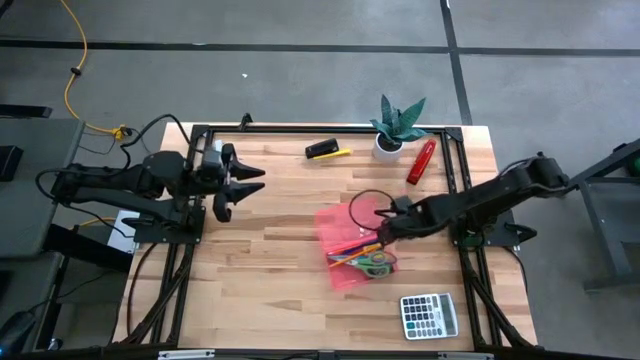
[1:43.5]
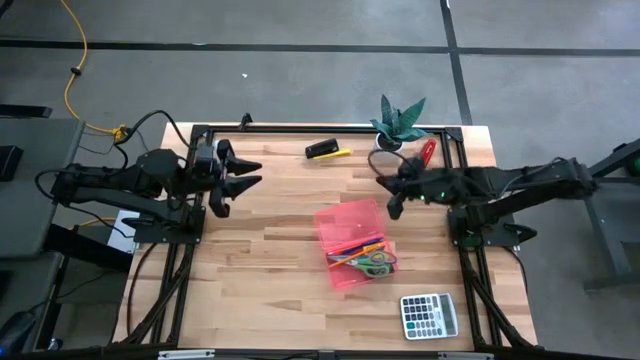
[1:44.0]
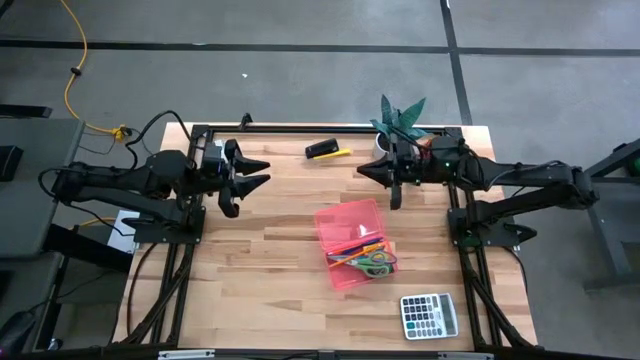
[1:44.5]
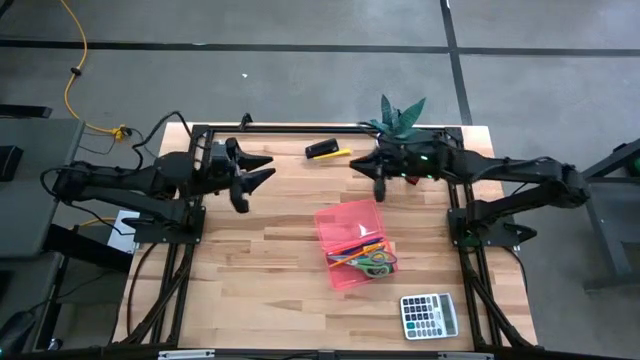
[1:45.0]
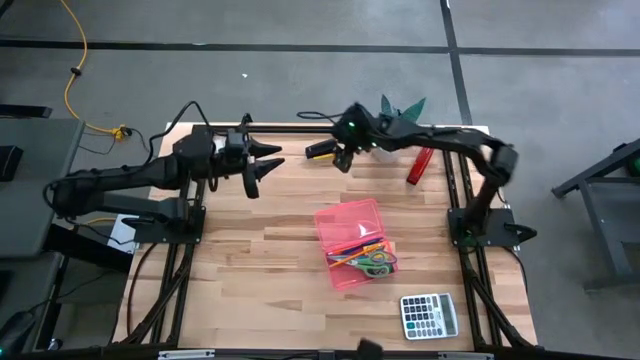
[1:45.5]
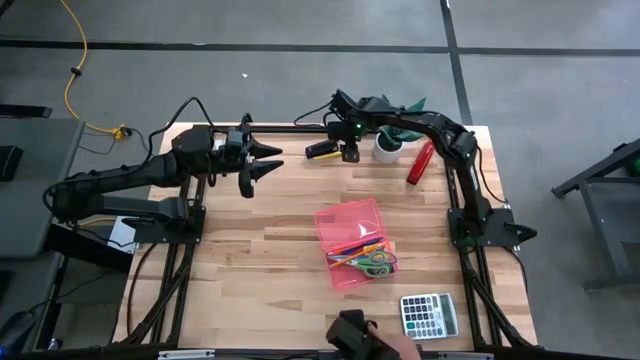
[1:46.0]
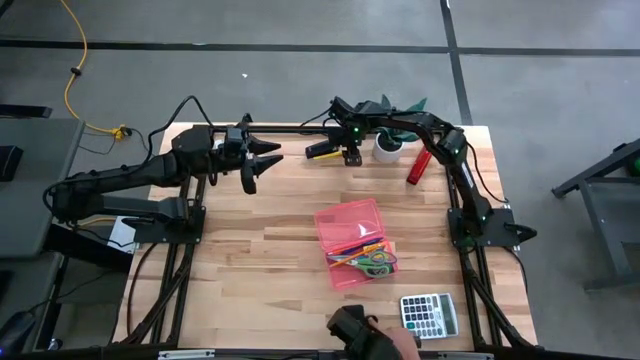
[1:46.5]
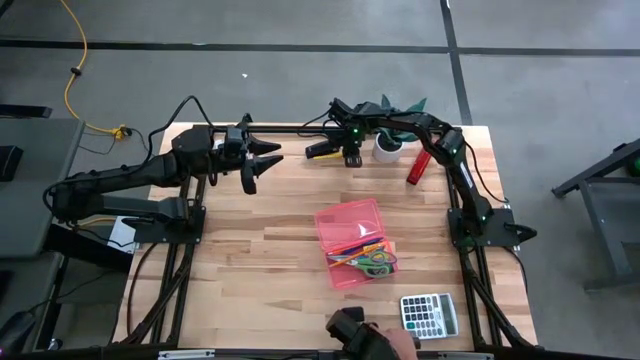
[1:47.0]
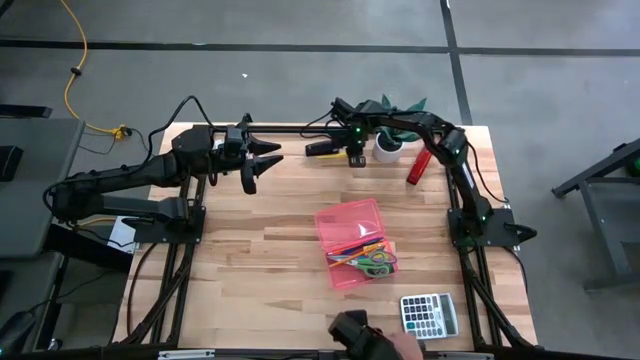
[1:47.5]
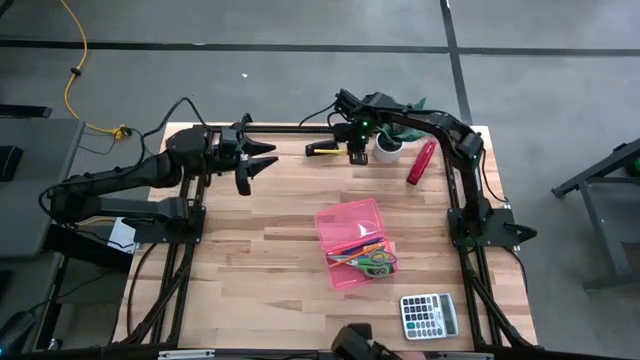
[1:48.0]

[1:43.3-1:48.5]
Task: Pack school essentials
Put the yellow pen into the pink supply box

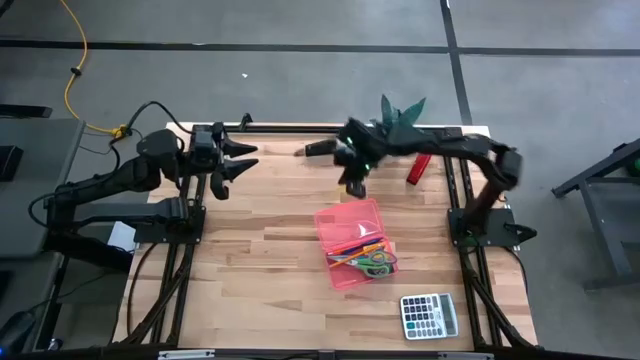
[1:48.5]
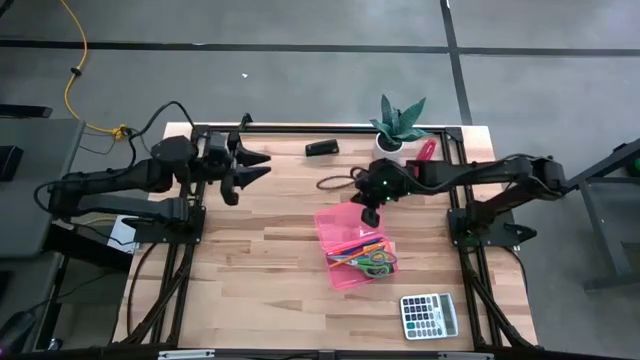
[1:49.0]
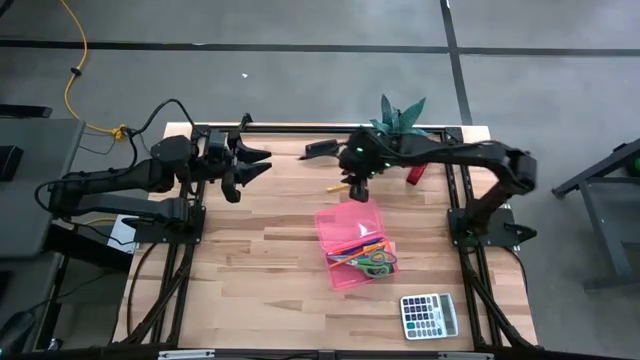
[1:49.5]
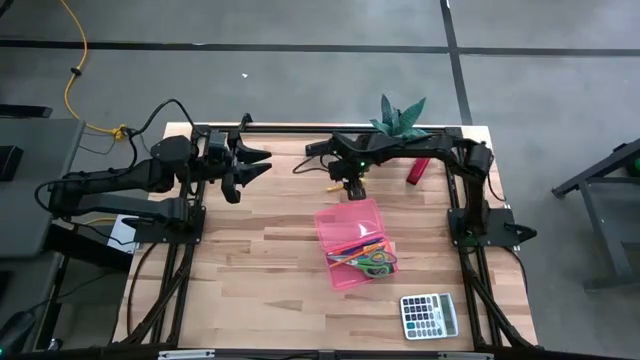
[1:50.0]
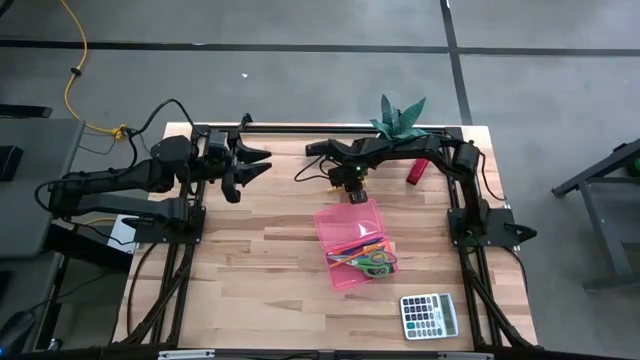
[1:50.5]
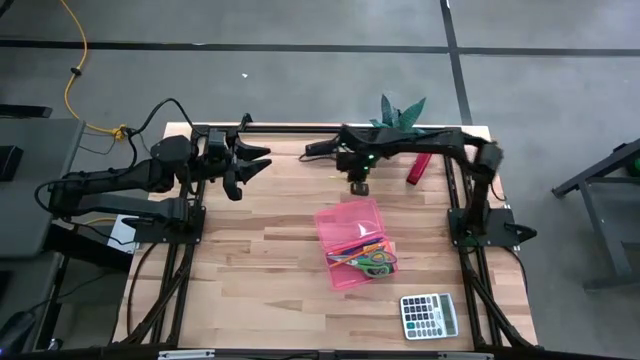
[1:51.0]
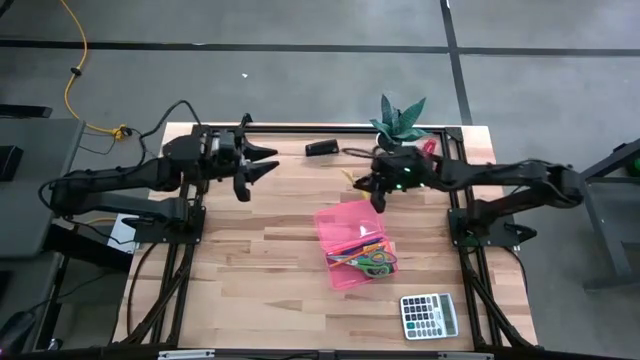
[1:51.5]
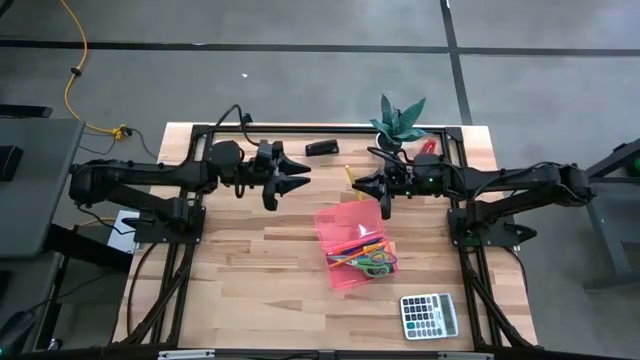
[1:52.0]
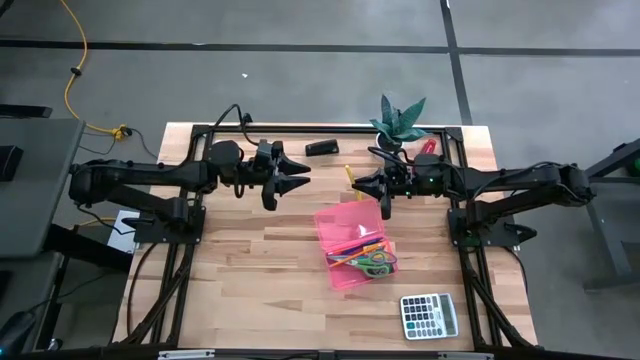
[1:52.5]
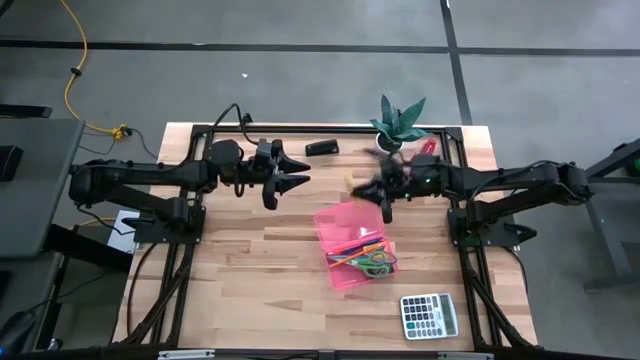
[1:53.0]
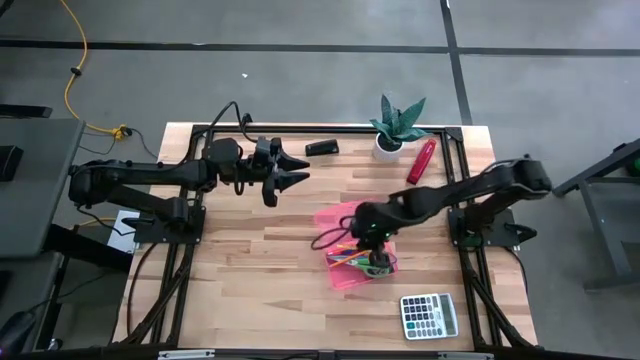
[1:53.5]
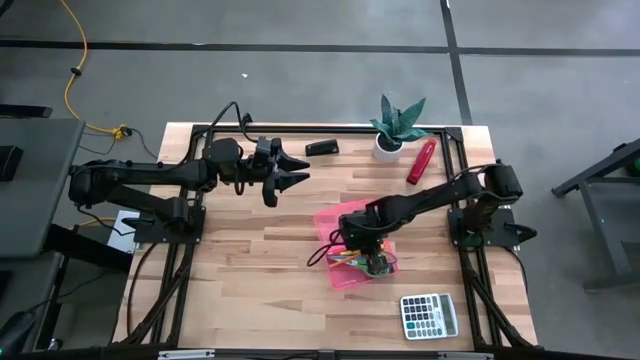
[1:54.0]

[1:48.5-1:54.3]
Put the yellow pen into the pink supply box

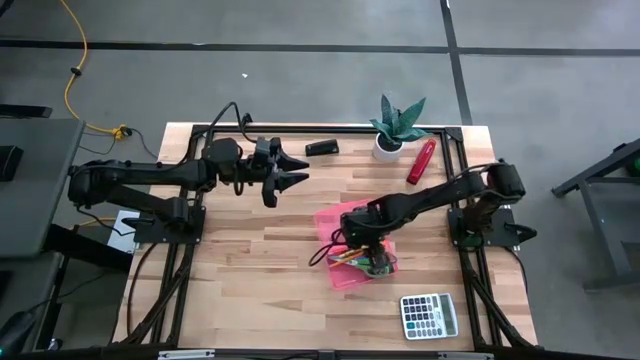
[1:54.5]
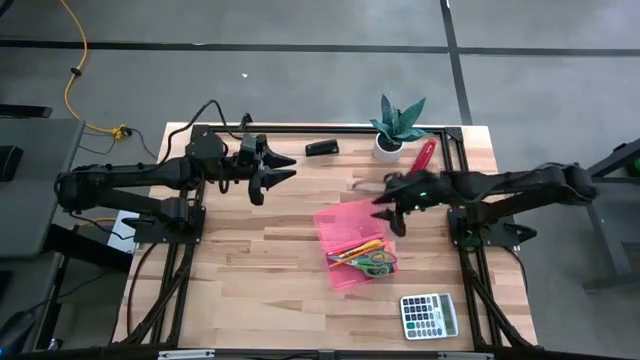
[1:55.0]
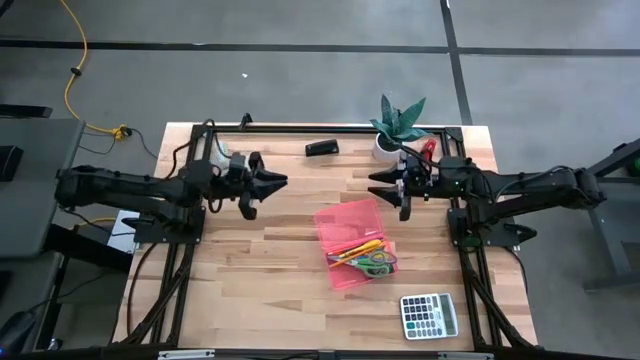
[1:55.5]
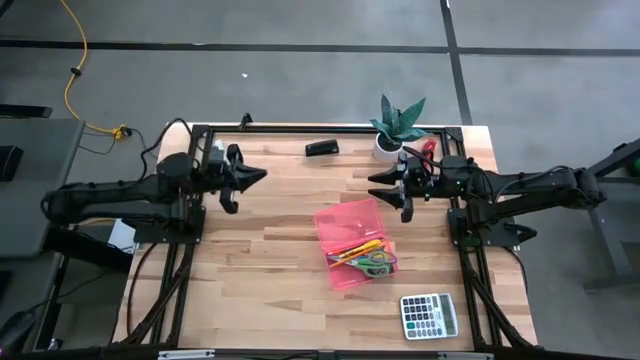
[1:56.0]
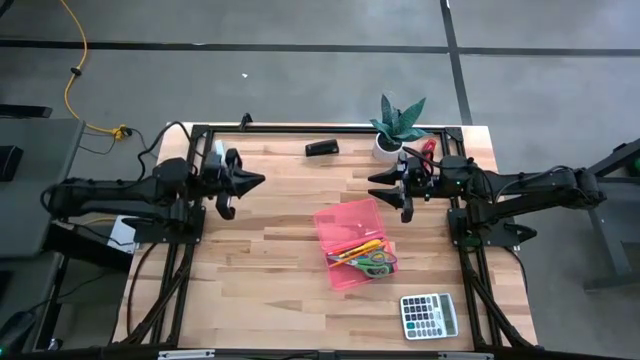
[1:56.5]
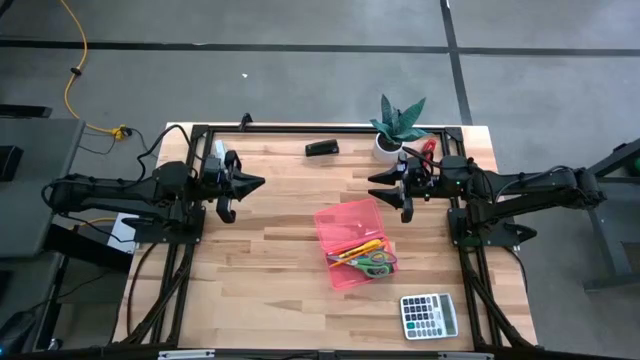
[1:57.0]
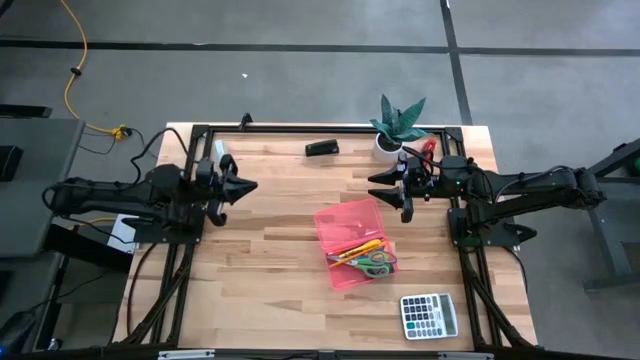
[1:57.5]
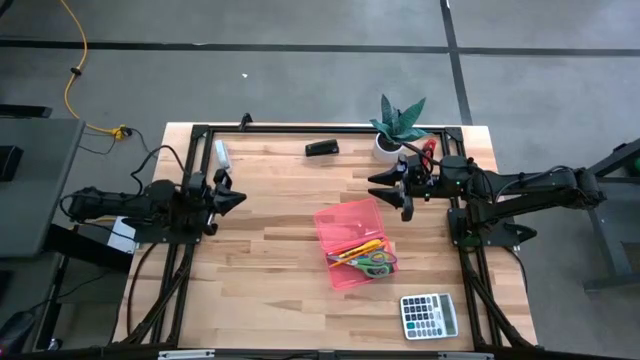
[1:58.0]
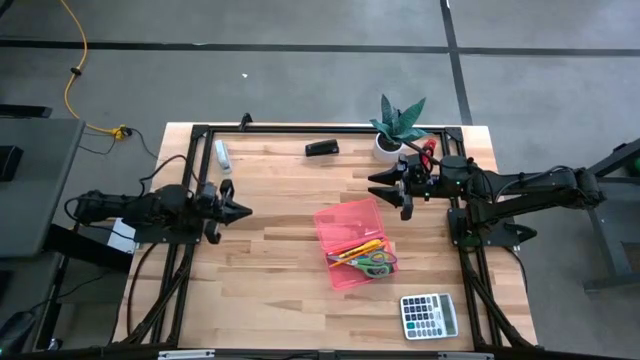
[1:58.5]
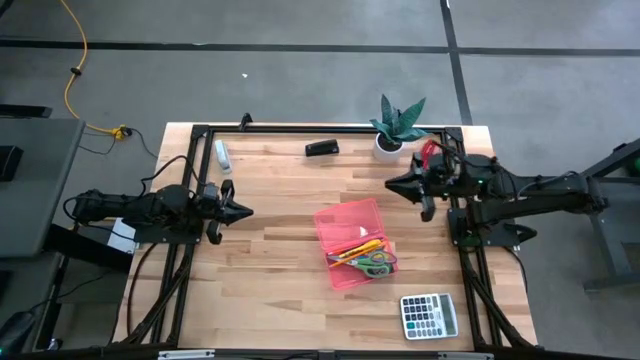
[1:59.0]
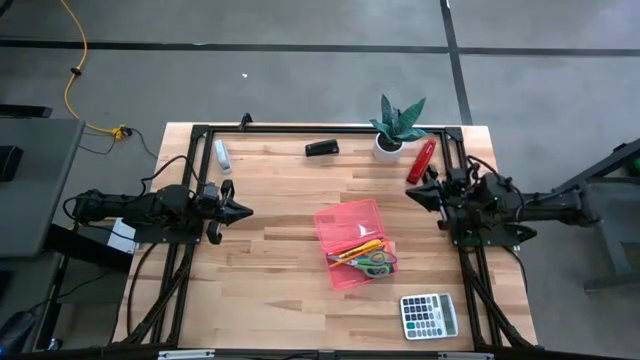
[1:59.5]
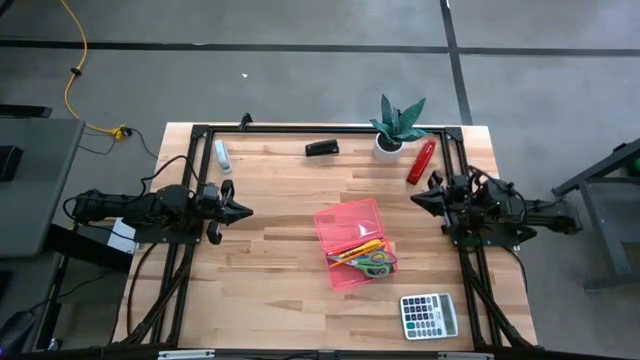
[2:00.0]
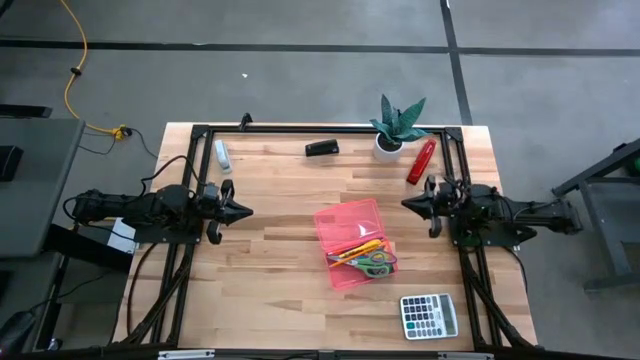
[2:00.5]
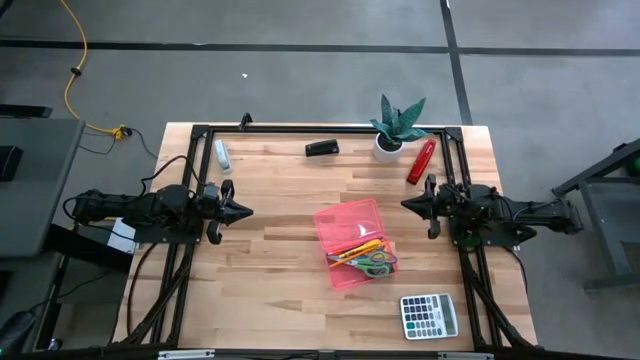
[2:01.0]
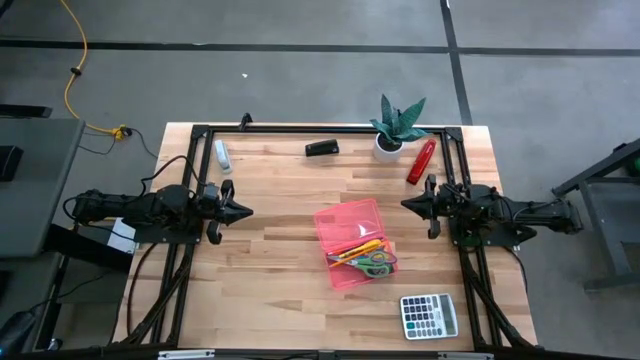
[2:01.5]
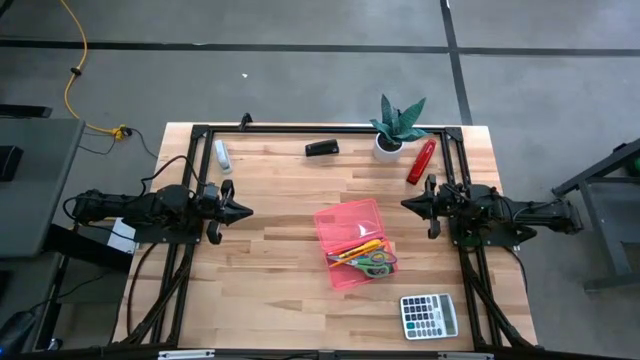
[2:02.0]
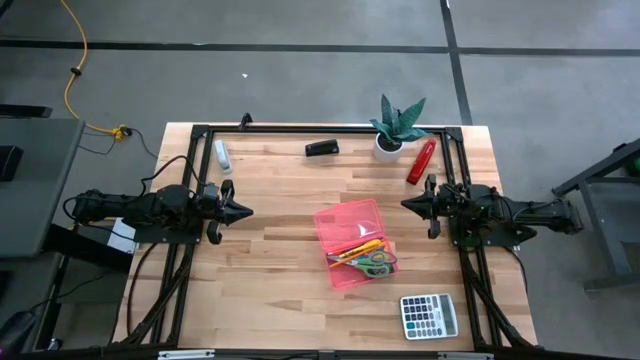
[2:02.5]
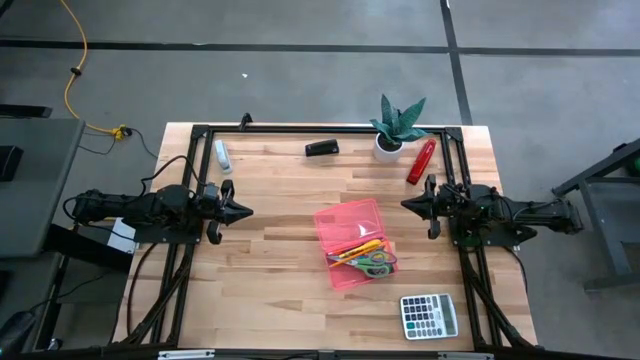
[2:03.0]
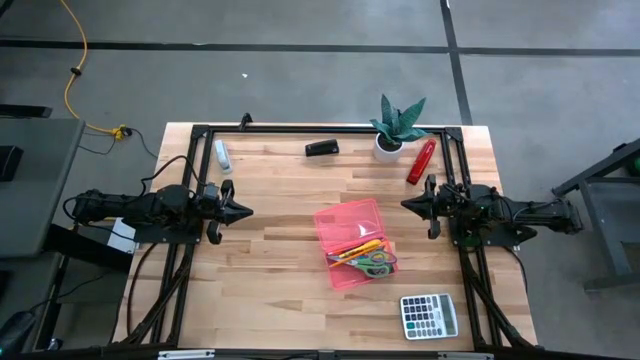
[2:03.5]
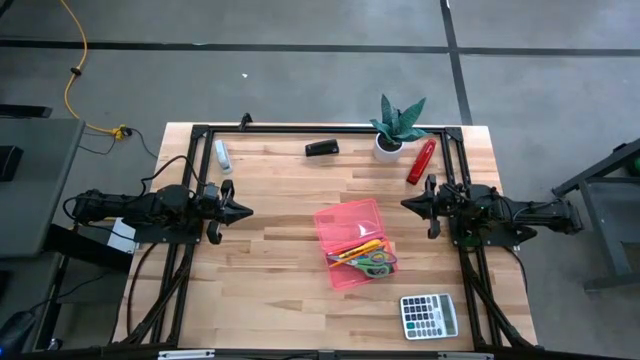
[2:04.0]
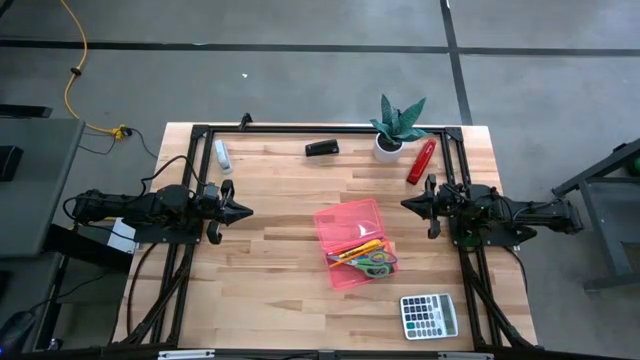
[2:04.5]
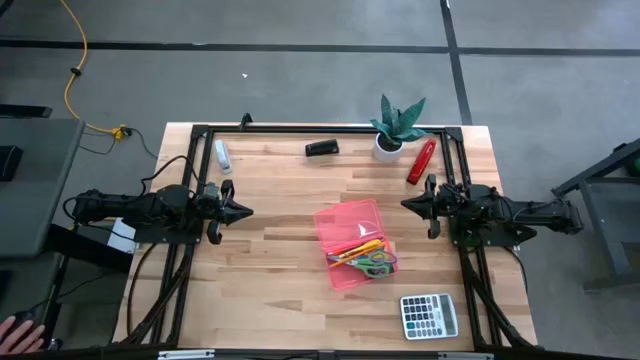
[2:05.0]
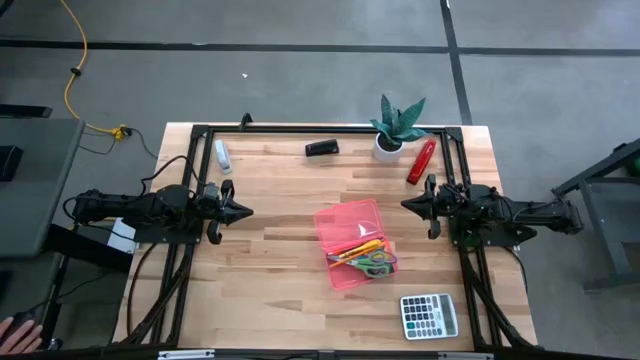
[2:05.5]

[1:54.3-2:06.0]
Return to Home Position
